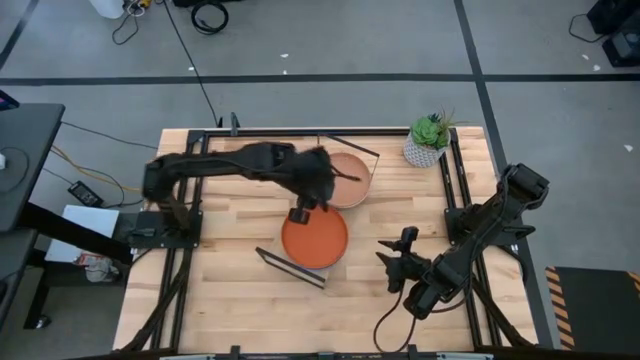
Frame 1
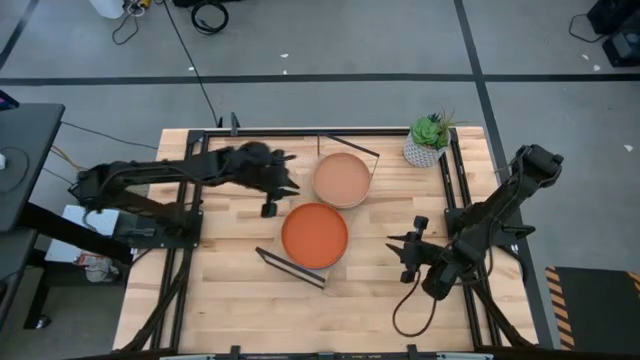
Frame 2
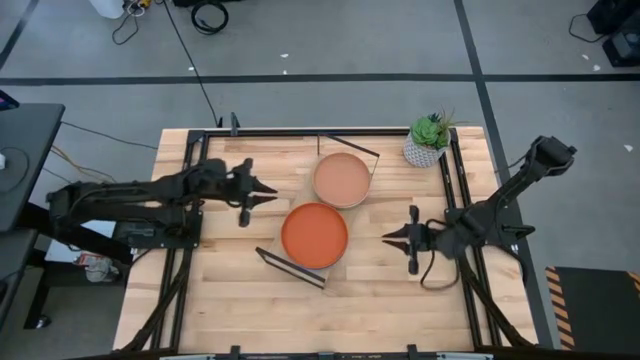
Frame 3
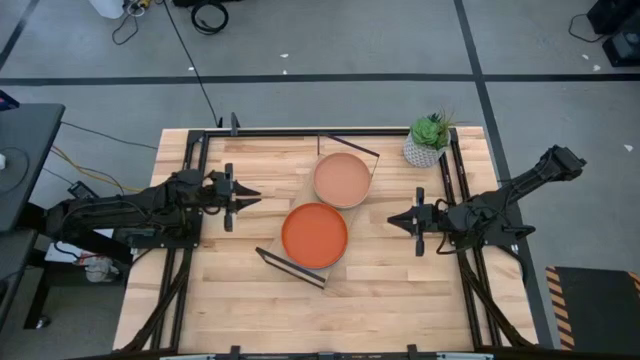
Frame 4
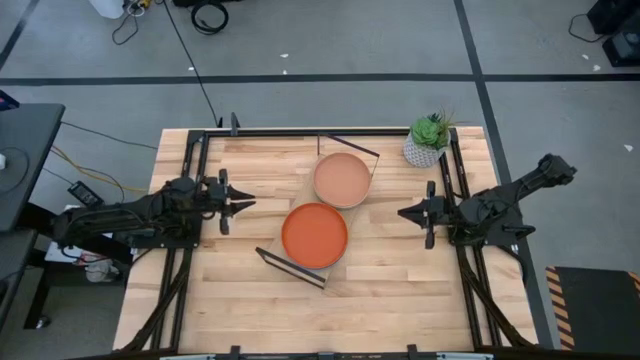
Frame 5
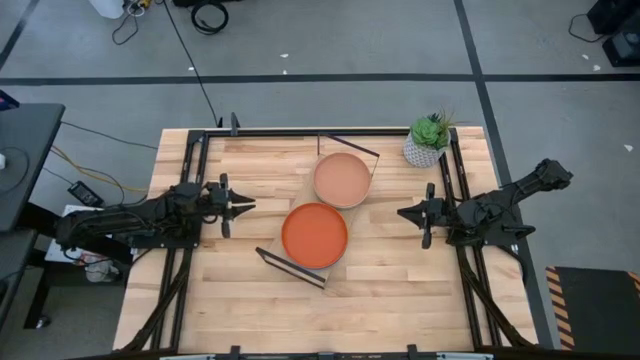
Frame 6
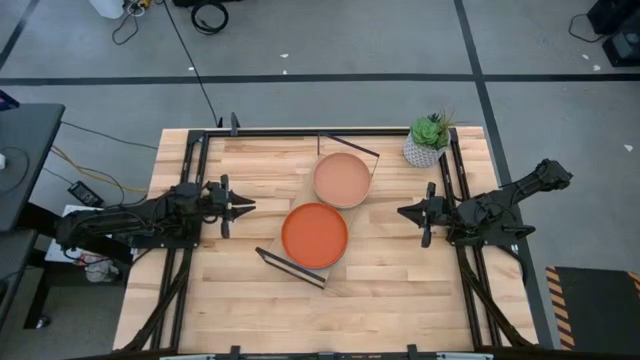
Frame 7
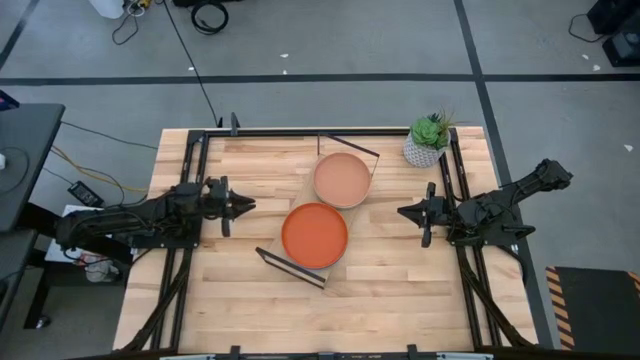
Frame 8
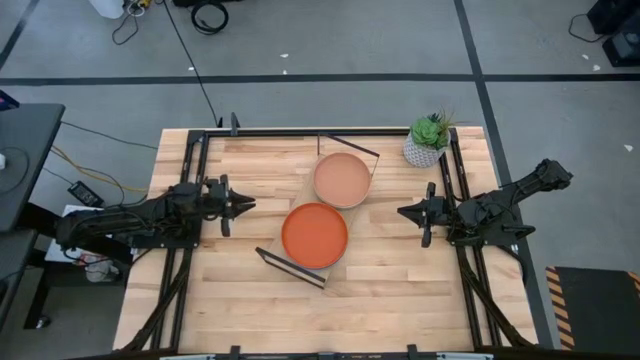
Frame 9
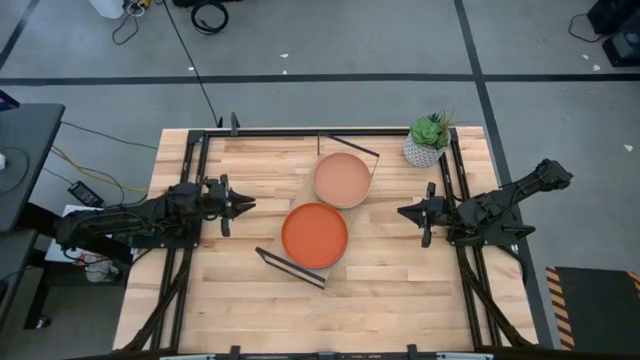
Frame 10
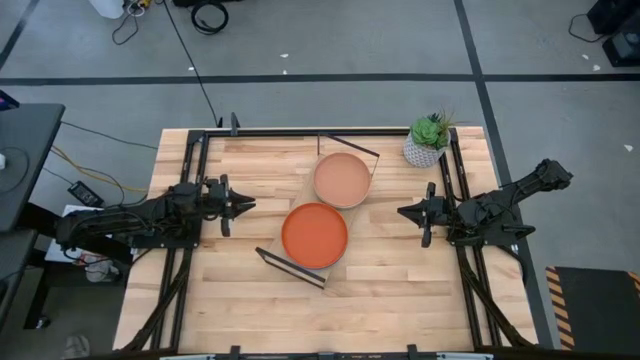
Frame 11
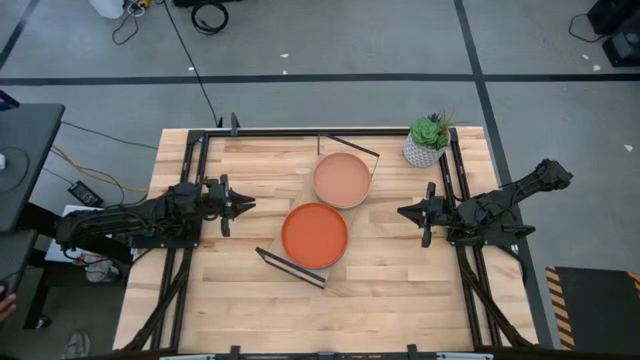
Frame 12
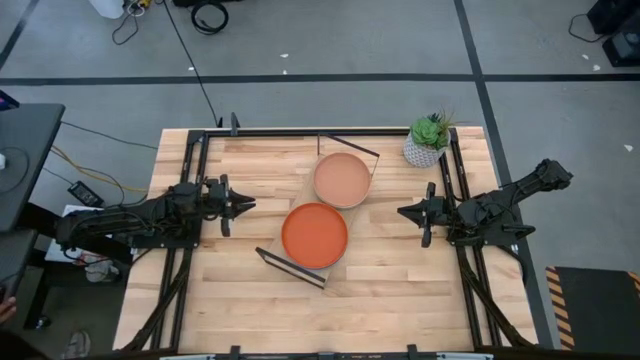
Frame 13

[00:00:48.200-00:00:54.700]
Task: Place and stack plates onto a shelf
Return to Home Position

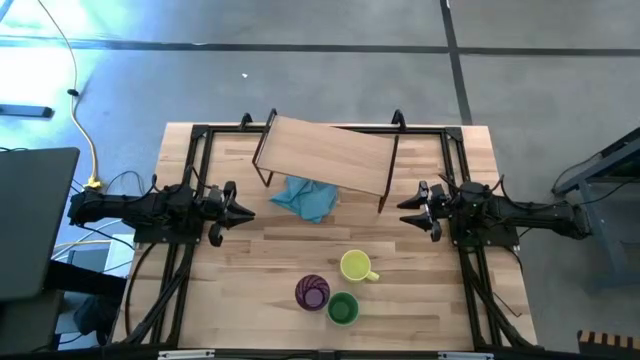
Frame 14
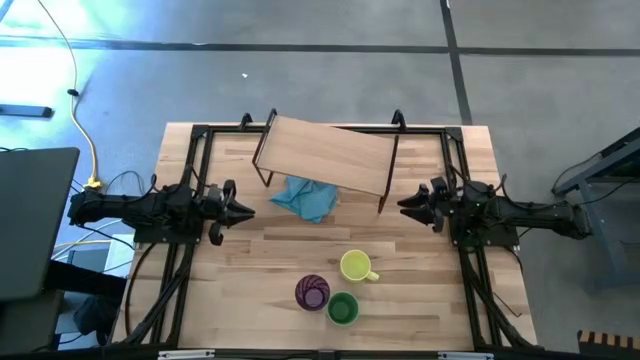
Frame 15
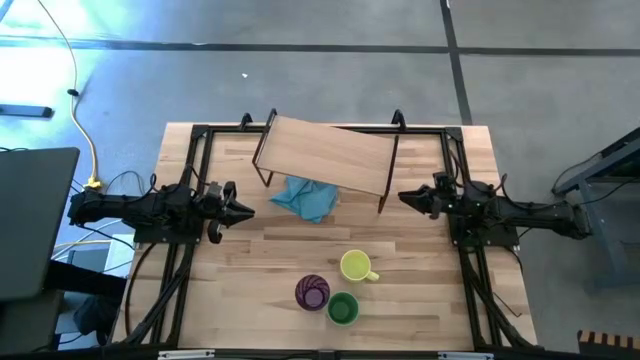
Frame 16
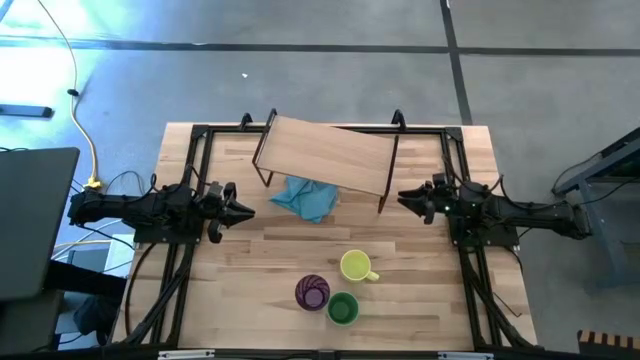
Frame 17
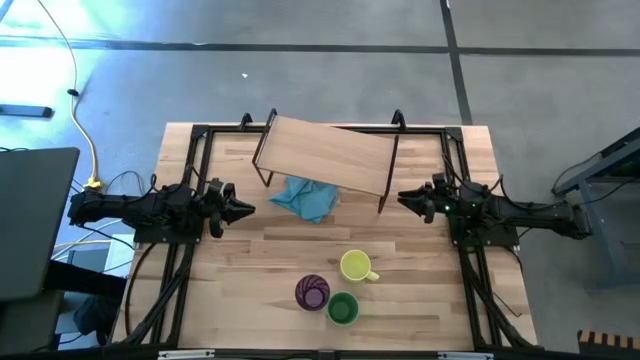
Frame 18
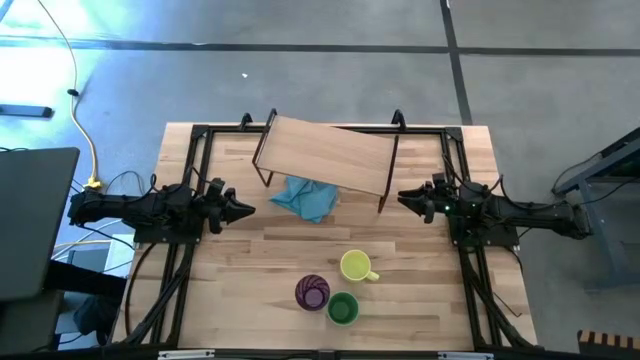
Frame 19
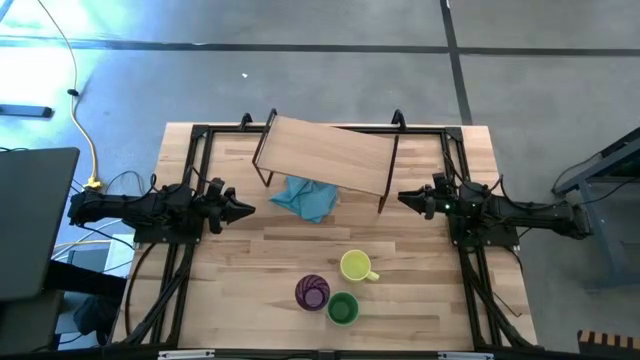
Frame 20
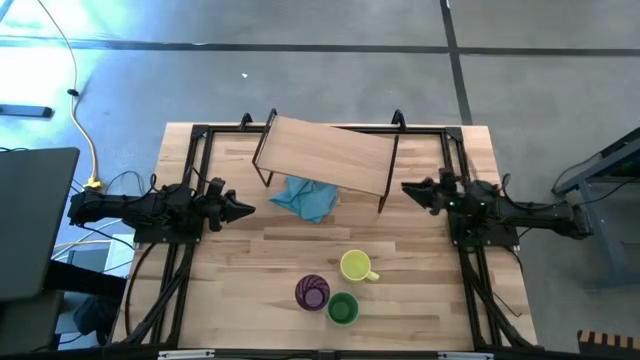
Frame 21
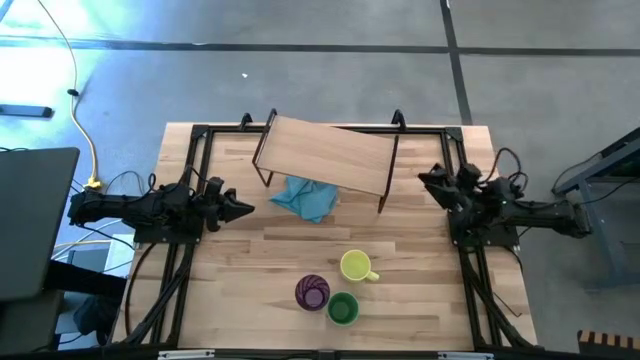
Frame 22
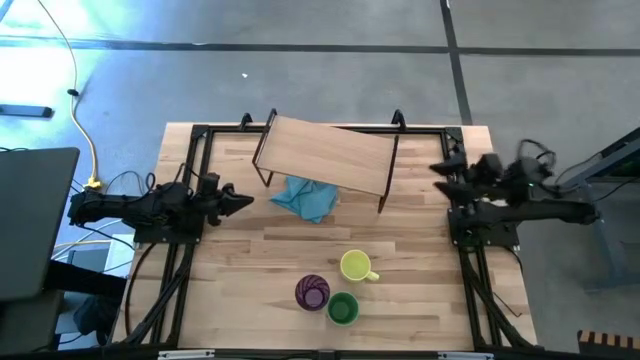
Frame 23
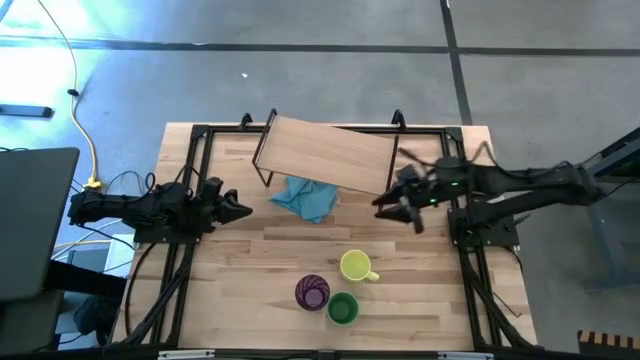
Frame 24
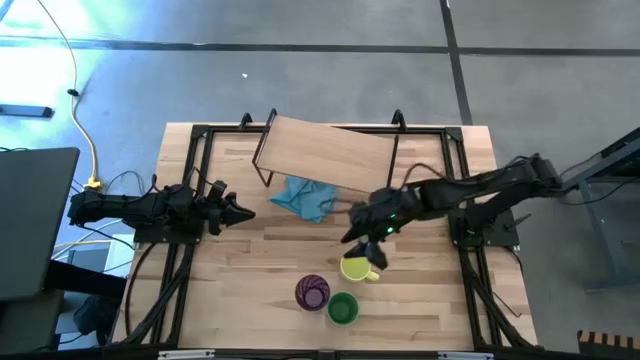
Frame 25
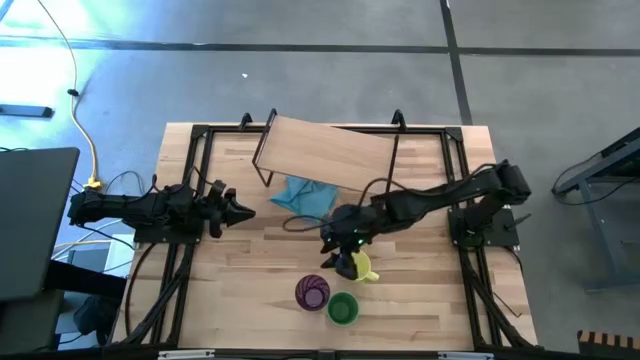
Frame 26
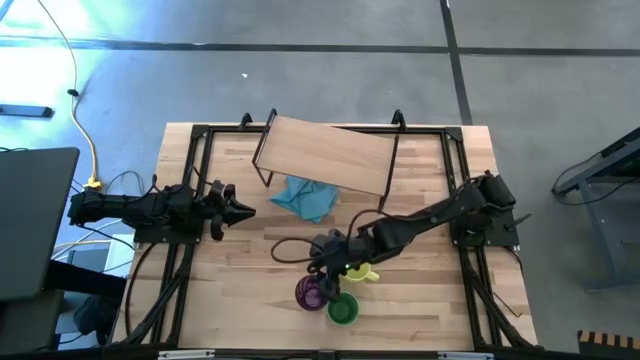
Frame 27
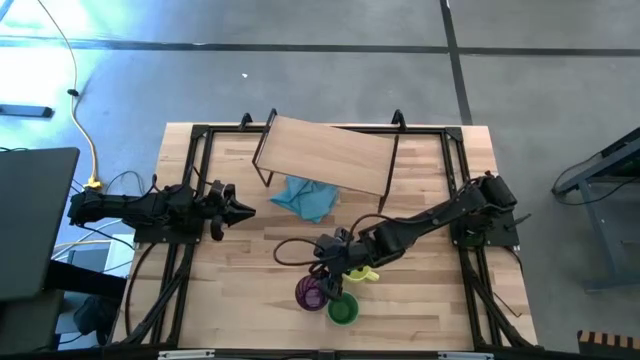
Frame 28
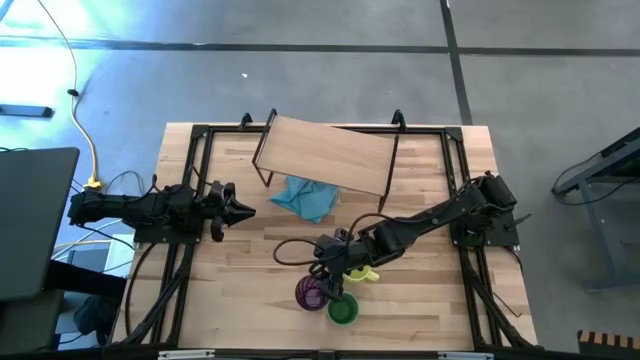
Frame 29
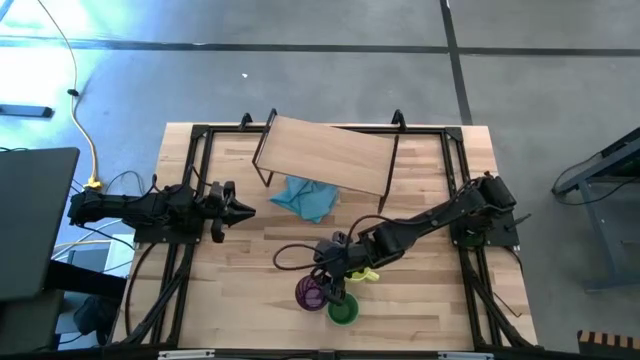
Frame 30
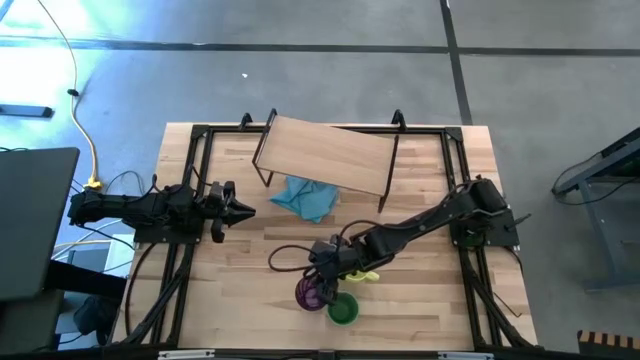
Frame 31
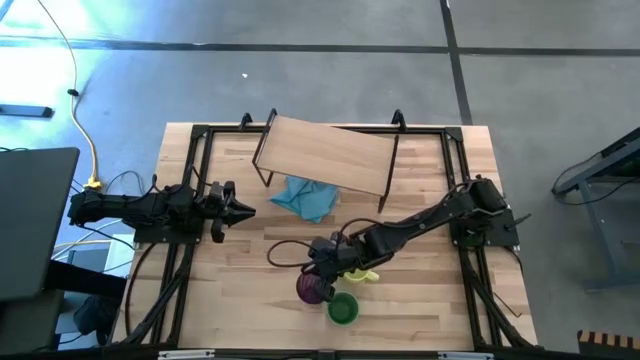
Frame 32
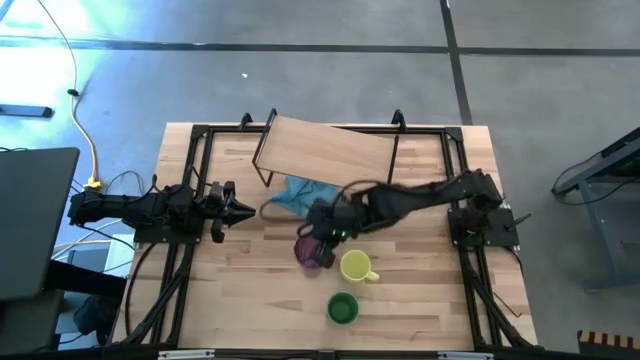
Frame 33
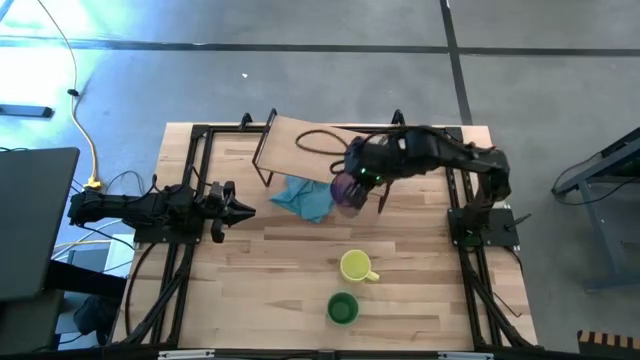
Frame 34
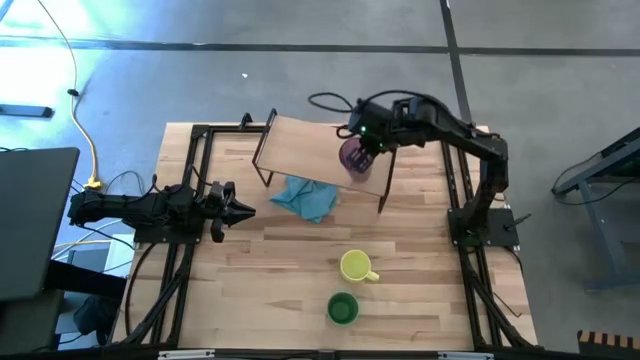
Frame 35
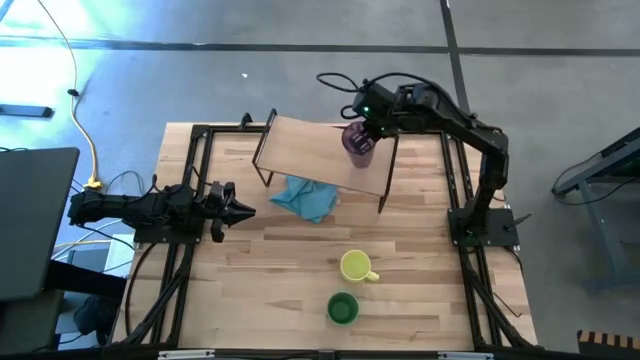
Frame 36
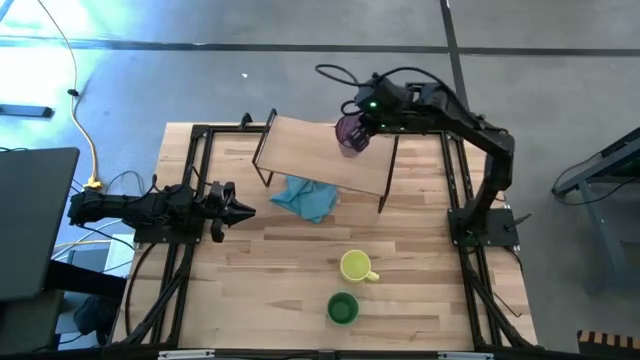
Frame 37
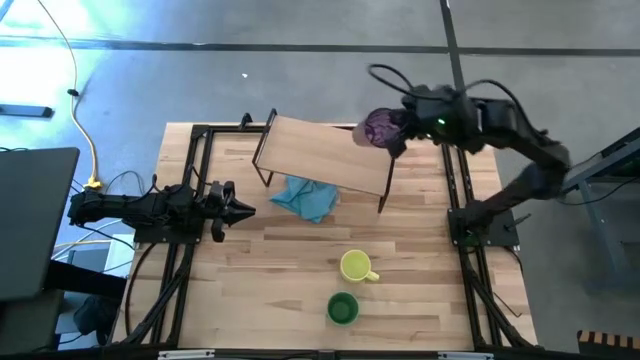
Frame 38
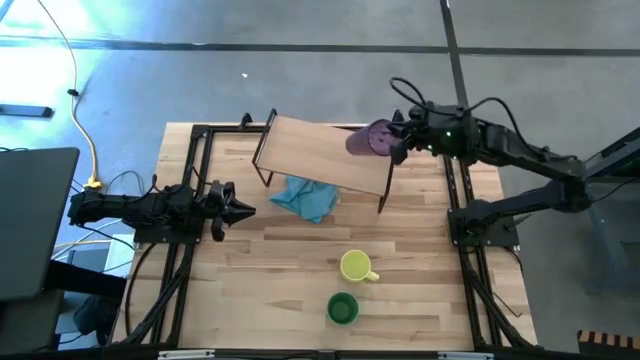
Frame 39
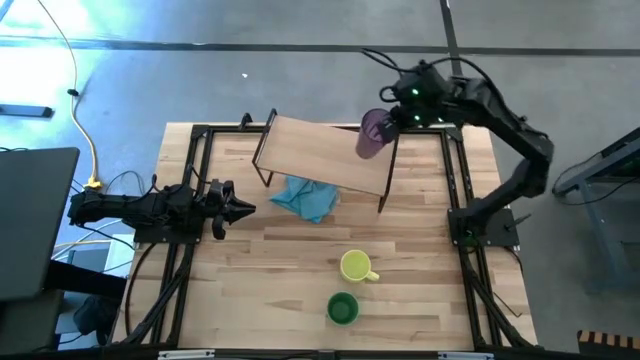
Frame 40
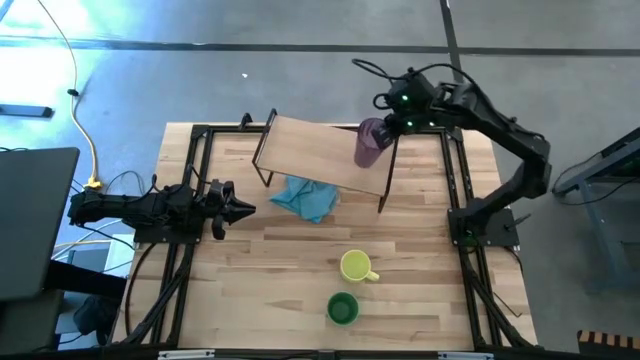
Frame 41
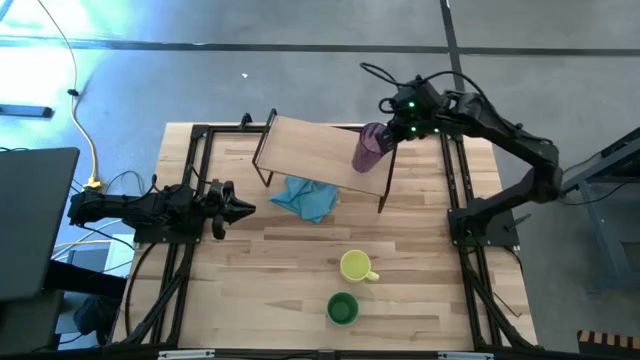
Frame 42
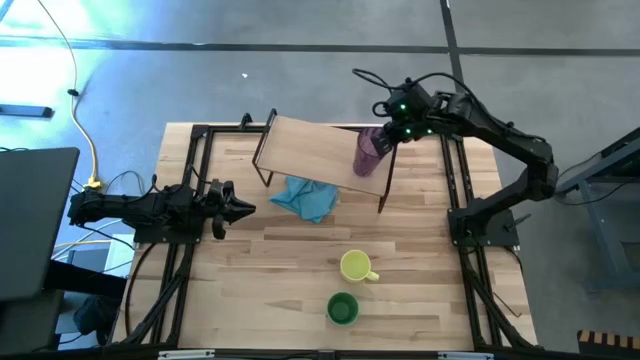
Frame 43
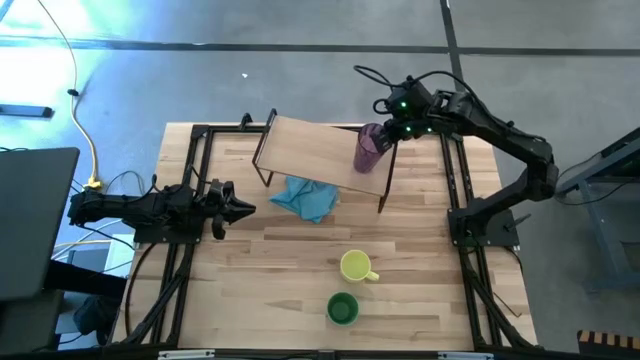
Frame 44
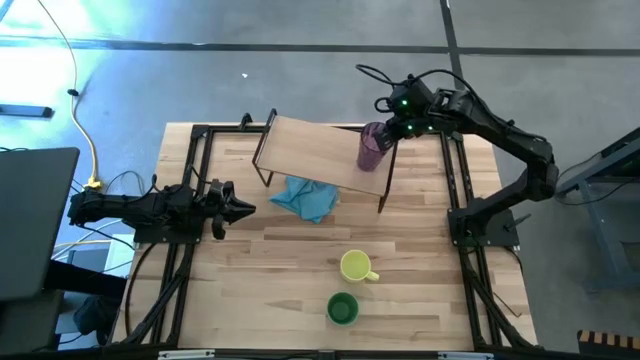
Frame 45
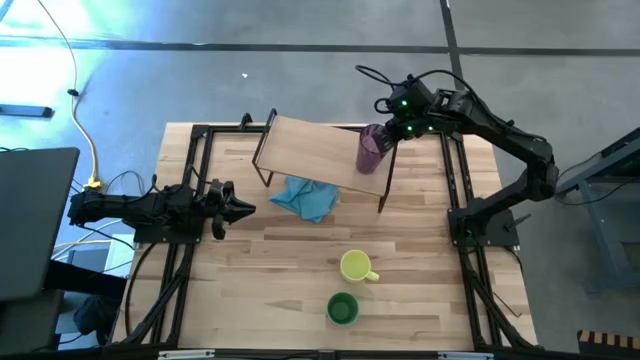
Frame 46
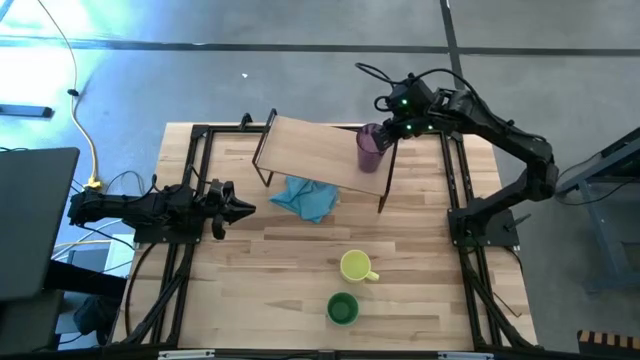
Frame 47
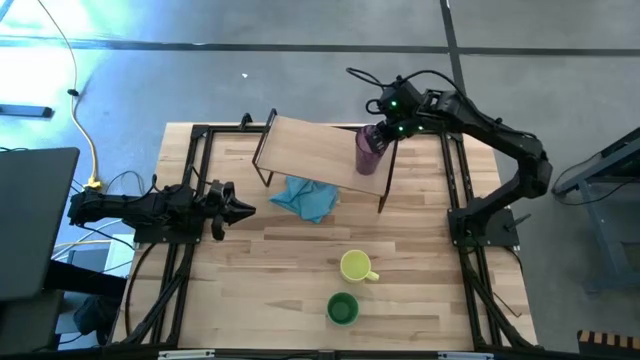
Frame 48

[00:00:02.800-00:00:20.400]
Task: Stack small to large cups/mugs on shelf
Put the purple cup on the shelf
